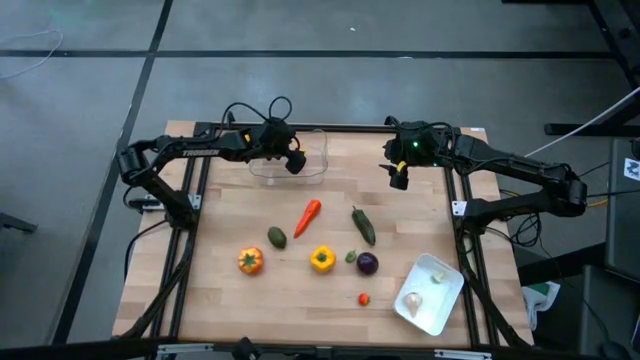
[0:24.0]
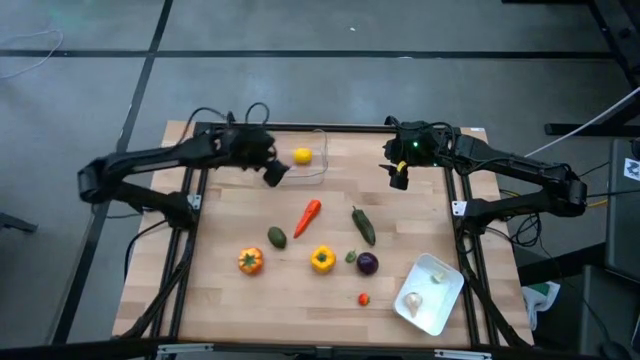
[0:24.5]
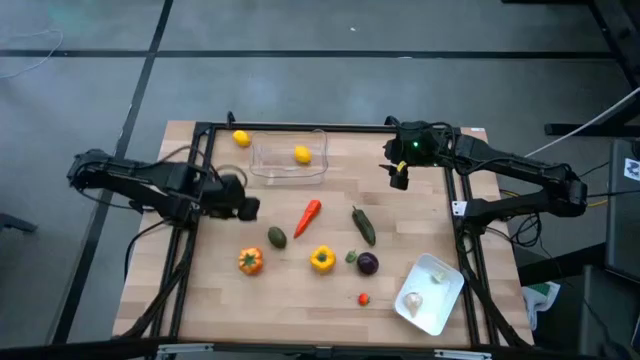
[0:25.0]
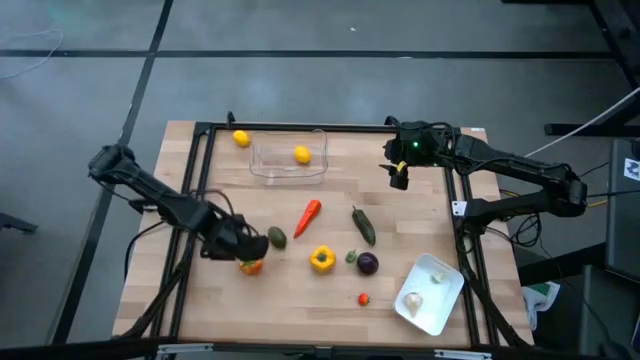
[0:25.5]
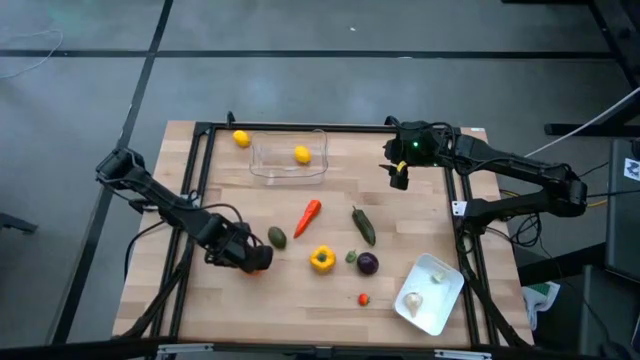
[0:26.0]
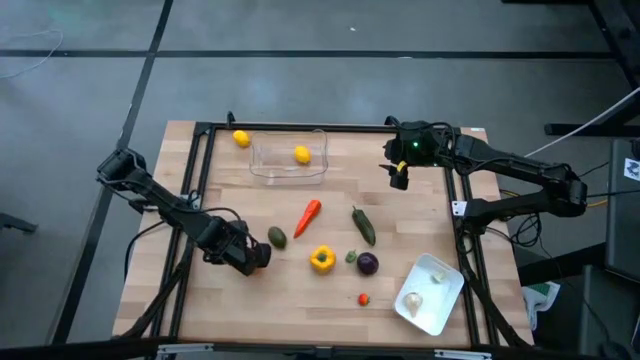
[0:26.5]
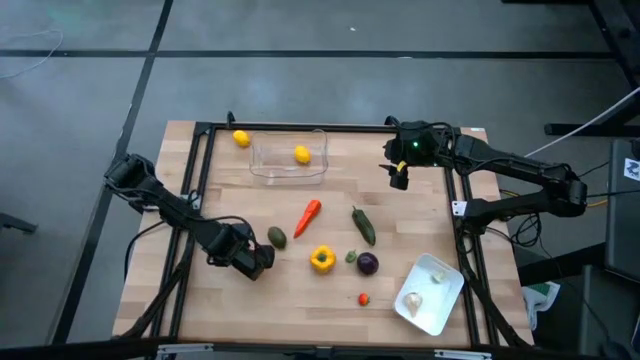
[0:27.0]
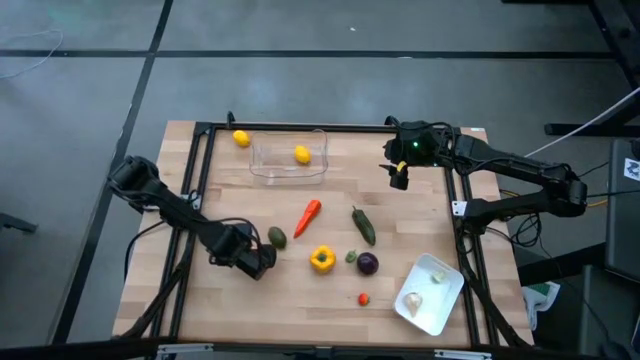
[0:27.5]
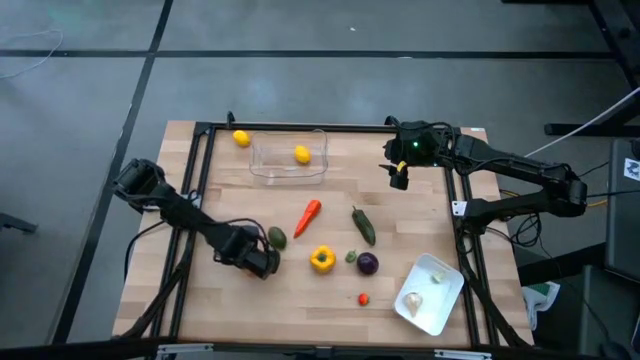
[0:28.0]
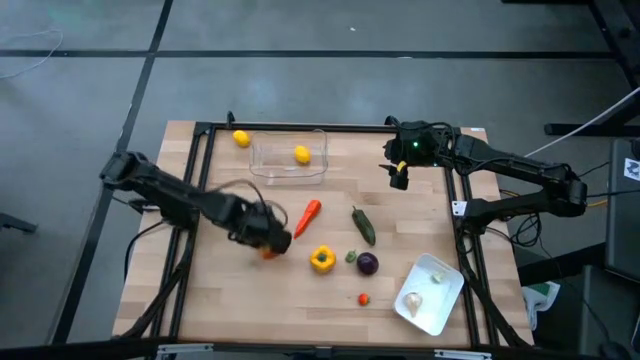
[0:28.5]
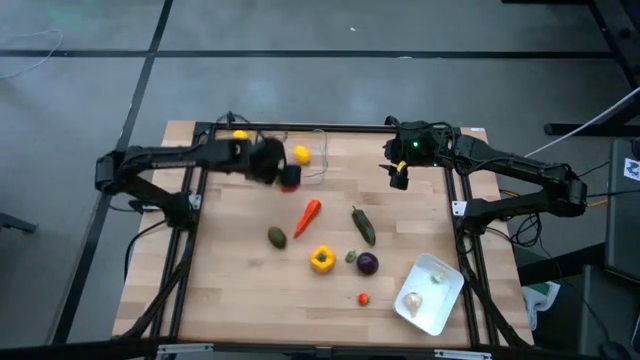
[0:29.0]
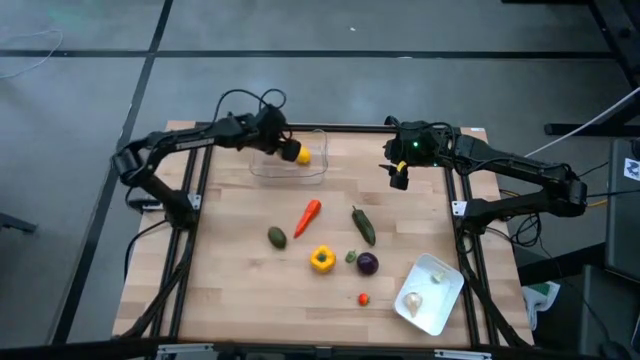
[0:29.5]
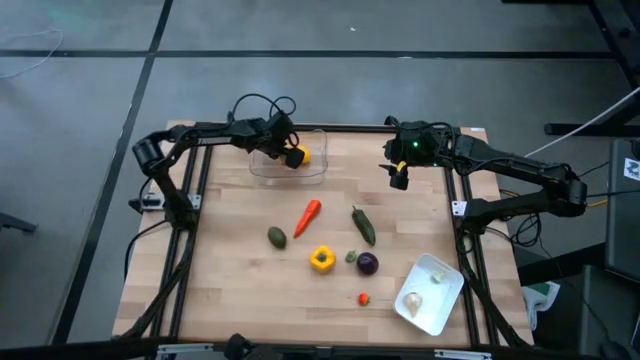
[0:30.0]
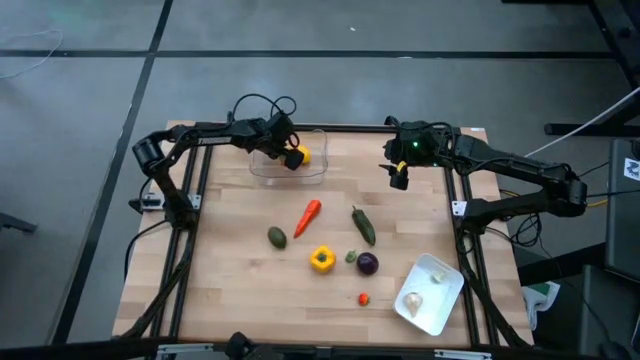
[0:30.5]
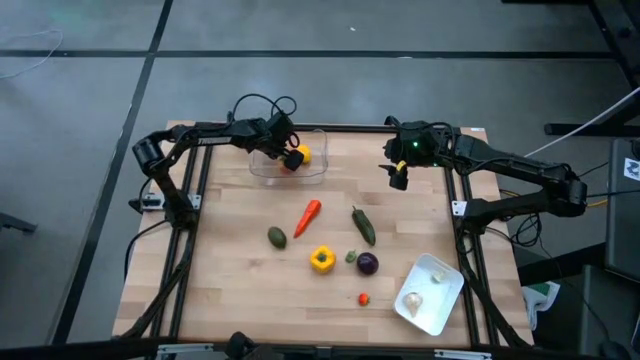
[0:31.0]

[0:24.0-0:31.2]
Task: Sort produce into baskets
Put the orange tomato into the transparent bin

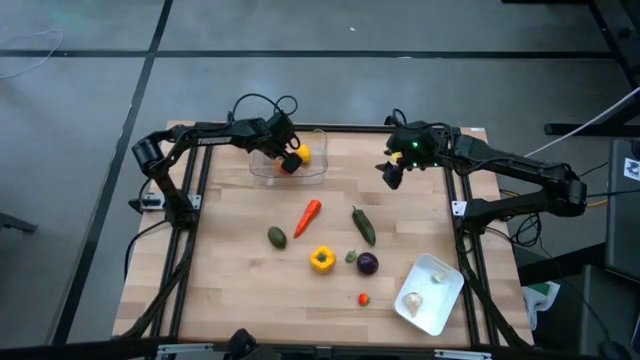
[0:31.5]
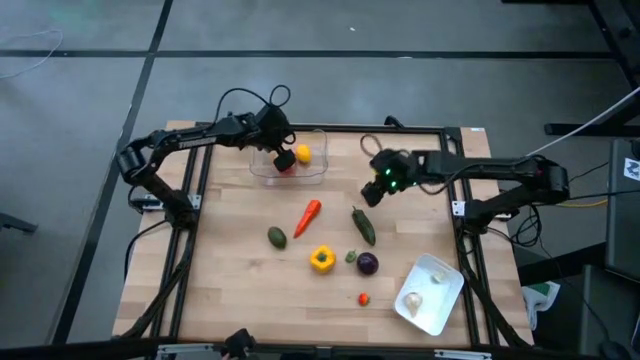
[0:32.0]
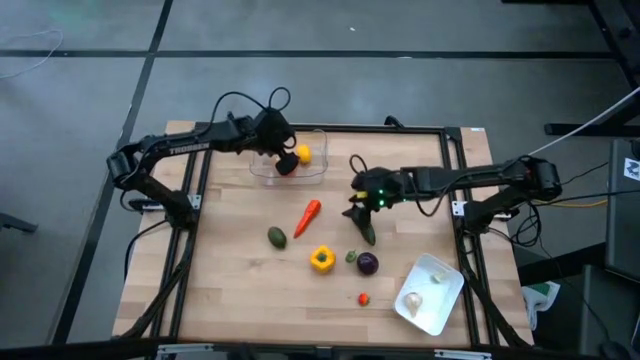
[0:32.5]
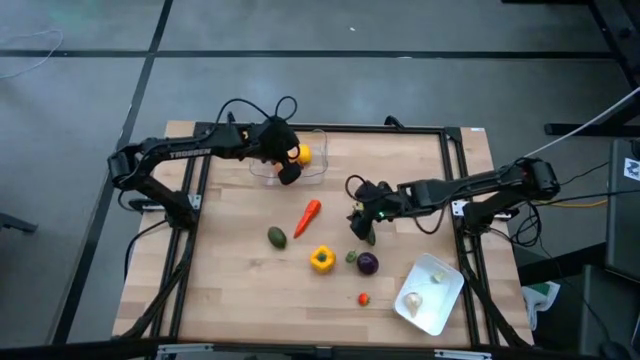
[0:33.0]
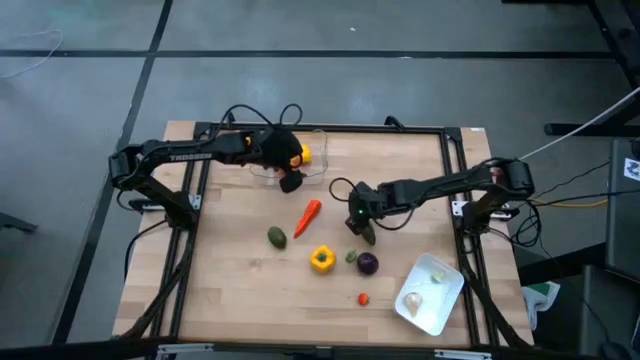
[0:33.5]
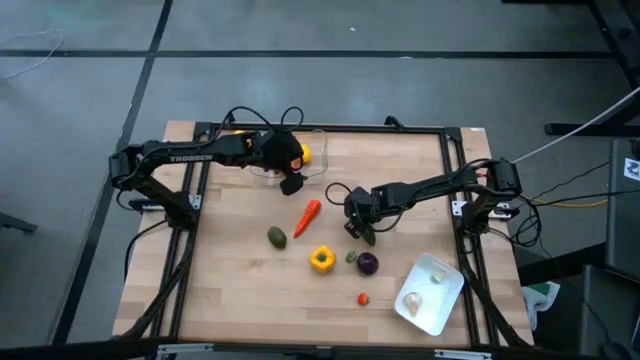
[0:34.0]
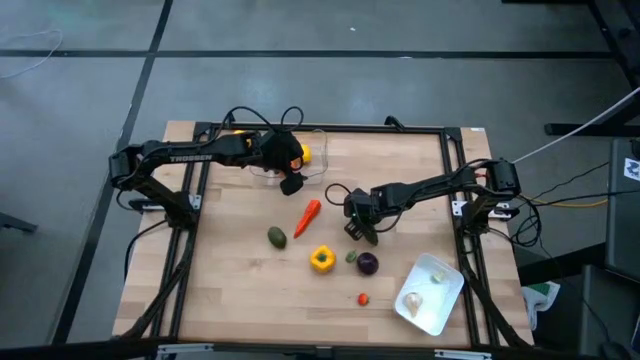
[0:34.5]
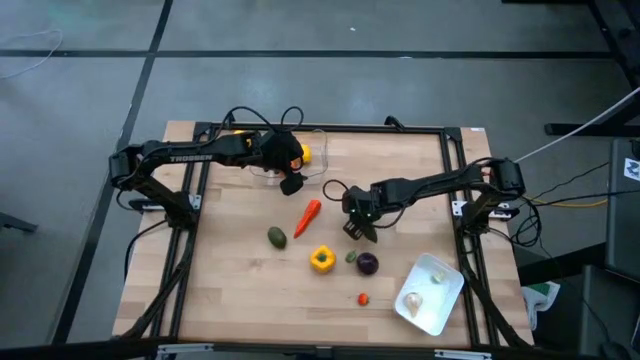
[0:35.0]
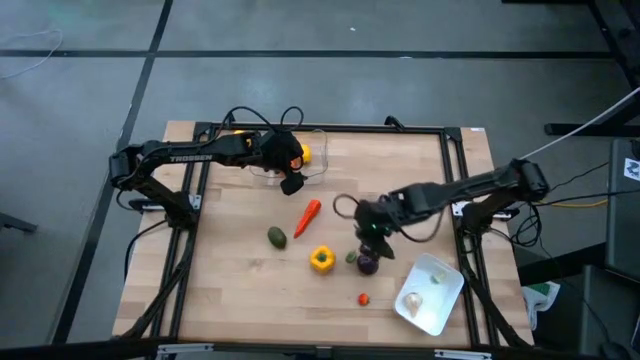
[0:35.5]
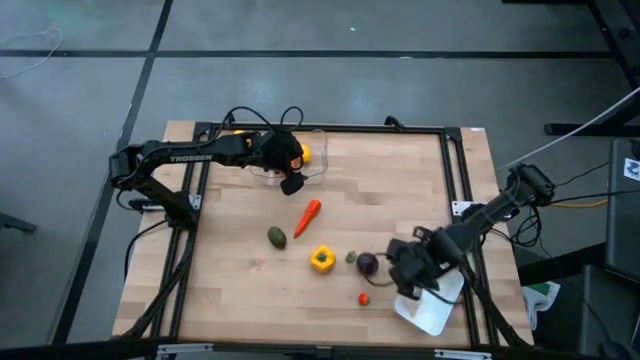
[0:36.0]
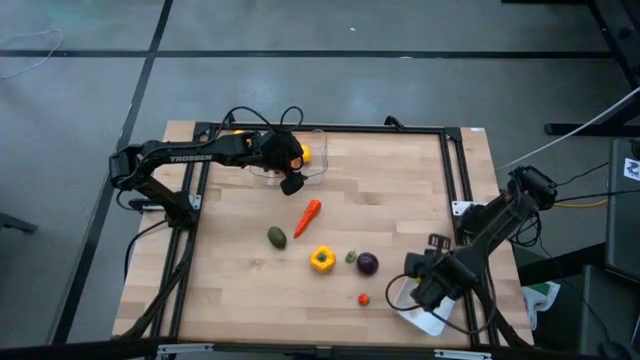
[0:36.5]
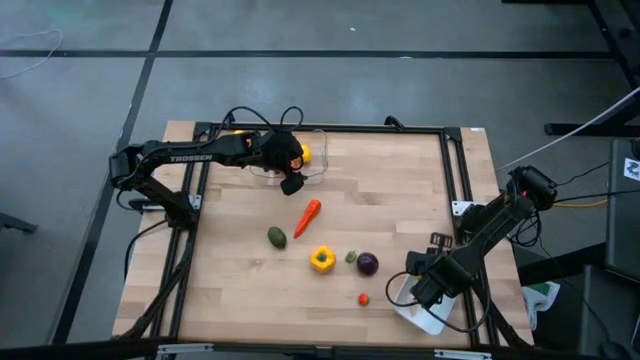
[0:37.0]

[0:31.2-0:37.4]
Put the top green chili pepper into the white bin

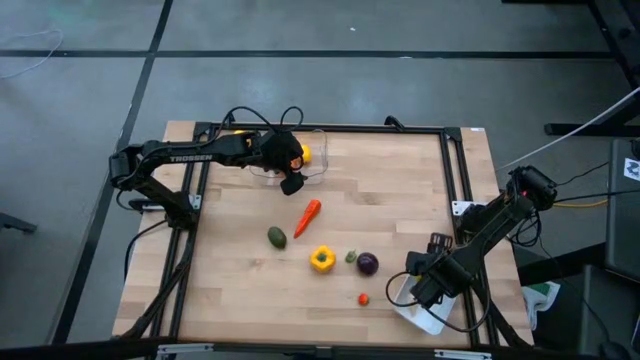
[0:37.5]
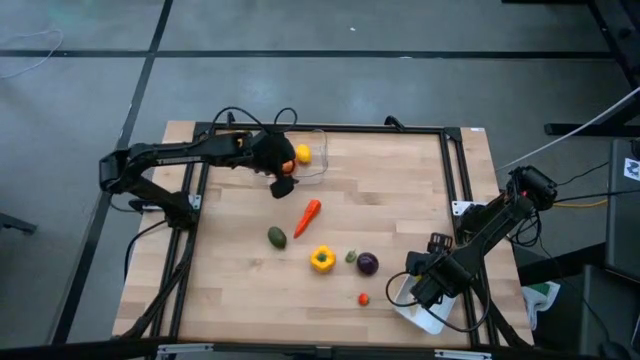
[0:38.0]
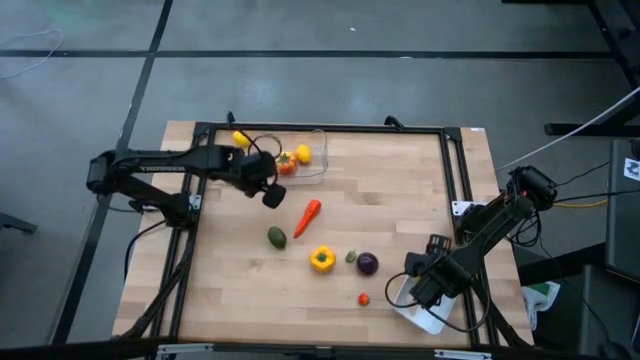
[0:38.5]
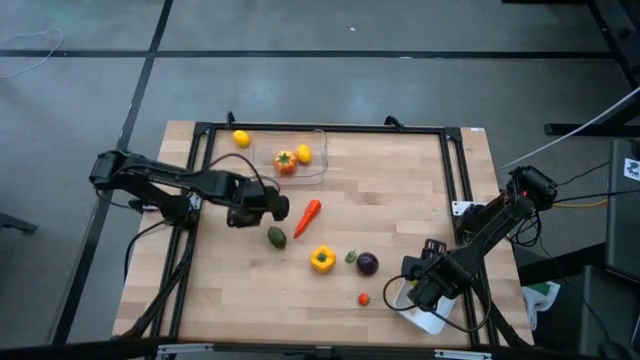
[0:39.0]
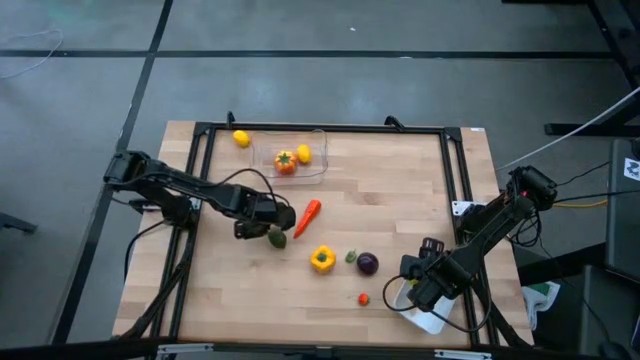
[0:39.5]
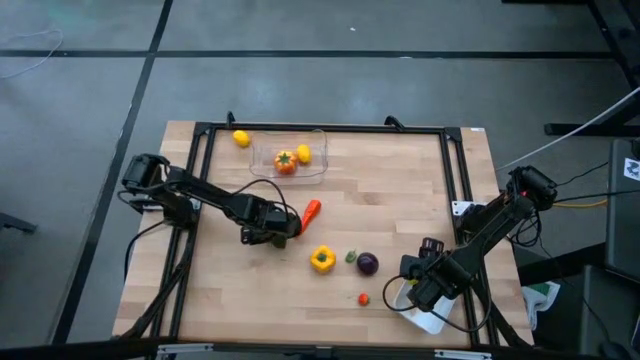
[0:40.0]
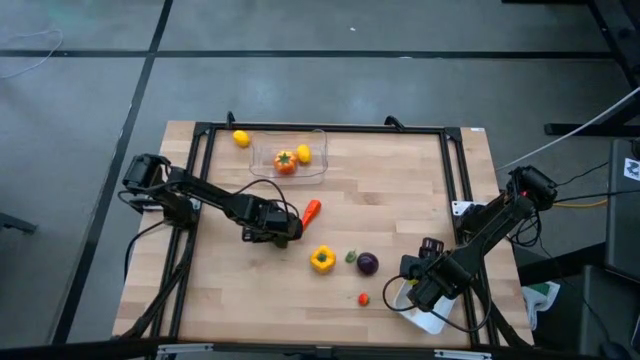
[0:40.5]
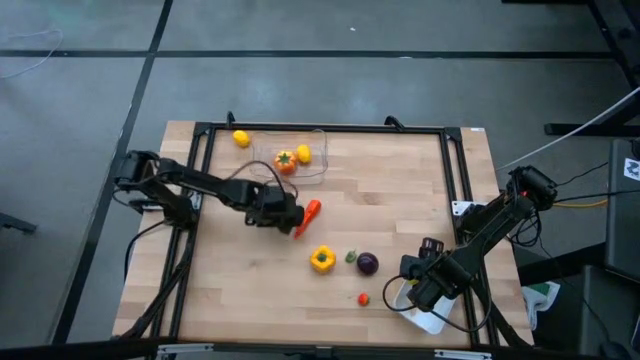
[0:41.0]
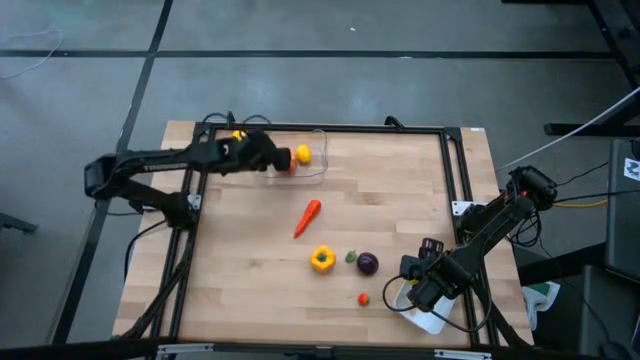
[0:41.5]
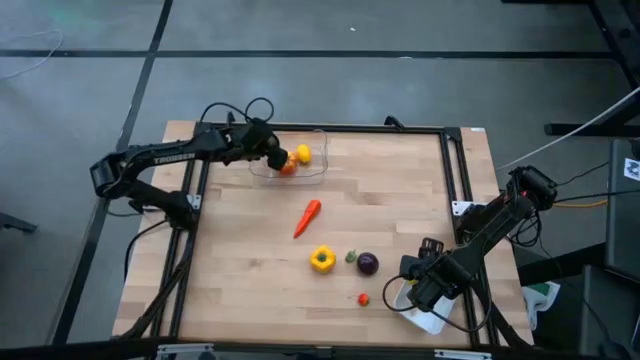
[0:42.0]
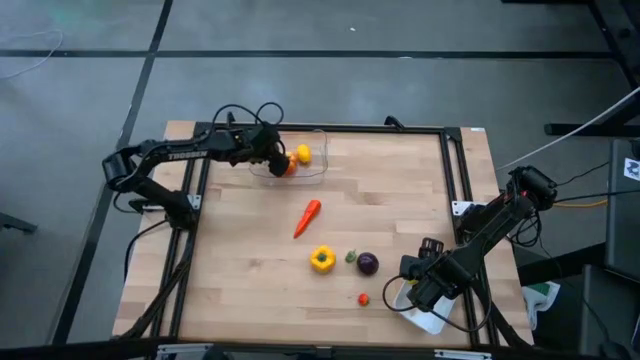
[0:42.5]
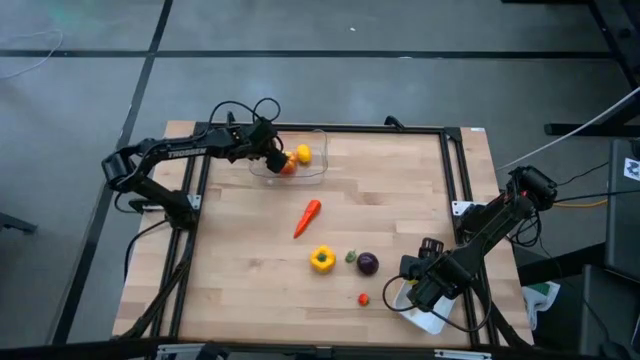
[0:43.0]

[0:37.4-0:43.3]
Put the green lime into the transparent bin

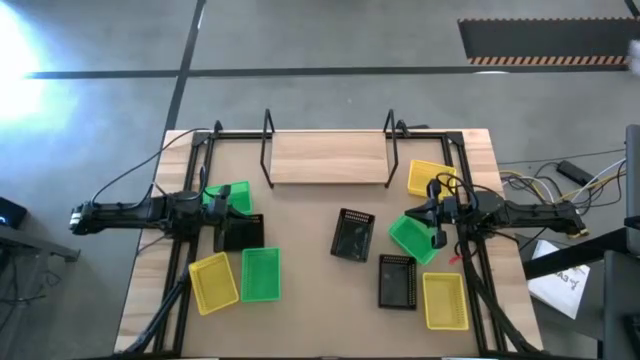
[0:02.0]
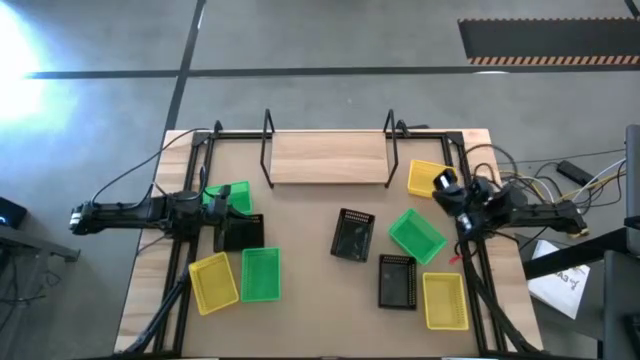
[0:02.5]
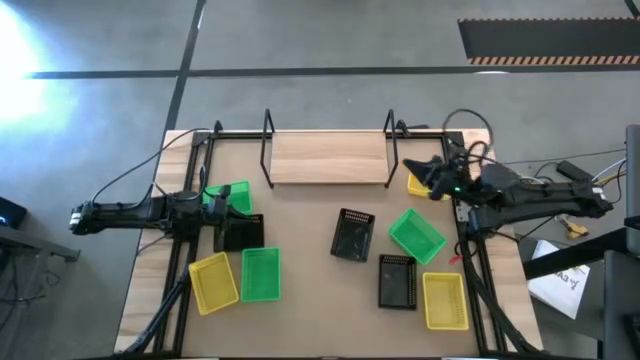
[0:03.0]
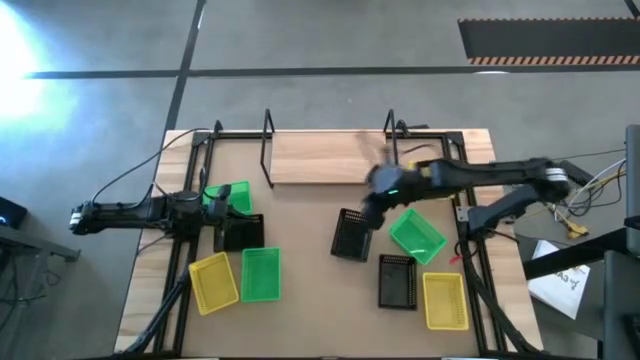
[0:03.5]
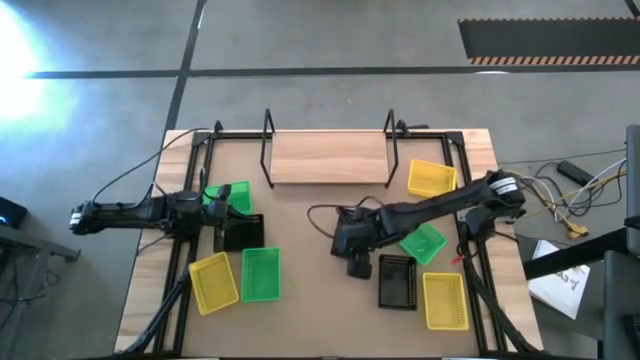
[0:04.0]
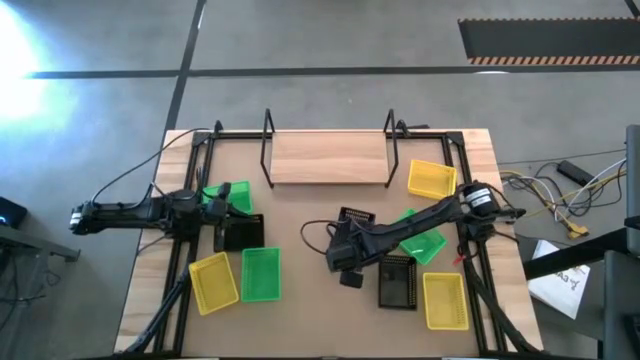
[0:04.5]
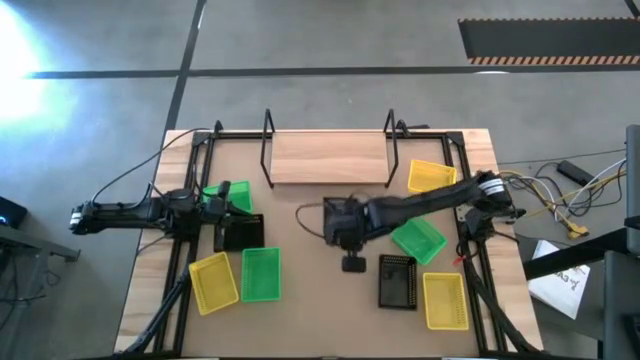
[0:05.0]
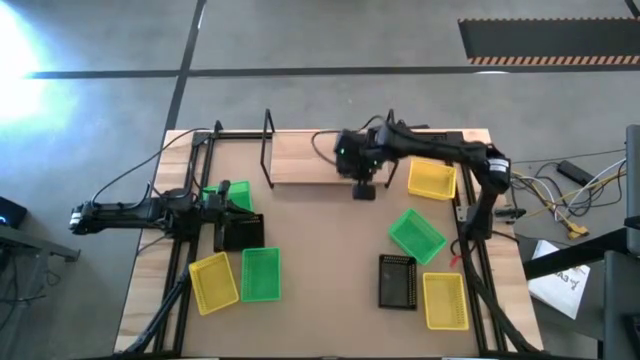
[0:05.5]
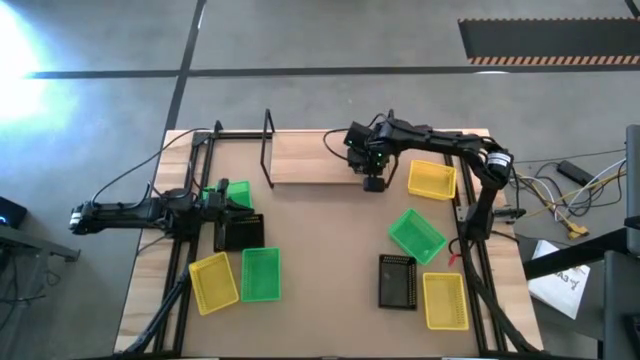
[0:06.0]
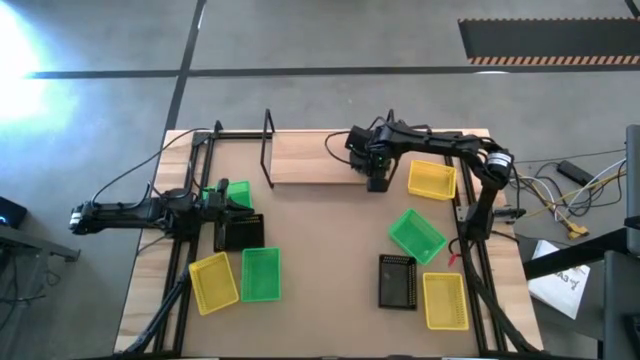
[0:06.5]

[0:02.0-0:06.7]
Task: Stack baskets on shelf by color
Put the middle black bin on the shelf
